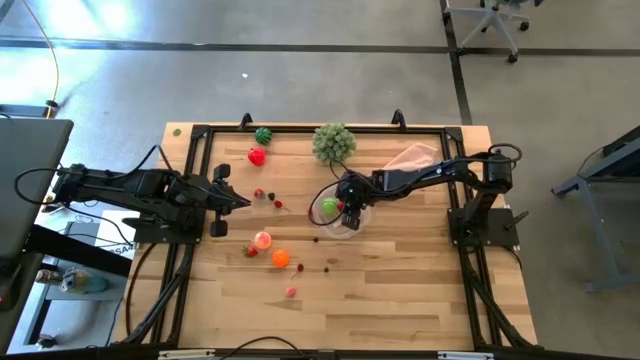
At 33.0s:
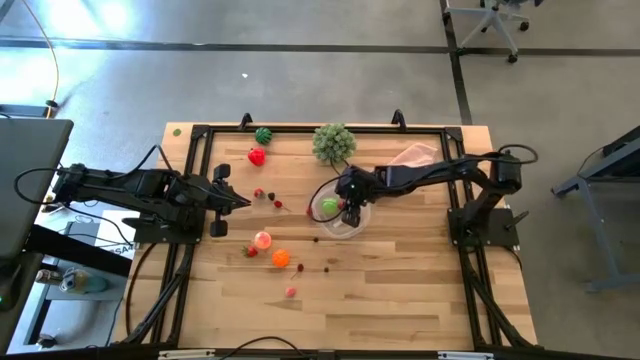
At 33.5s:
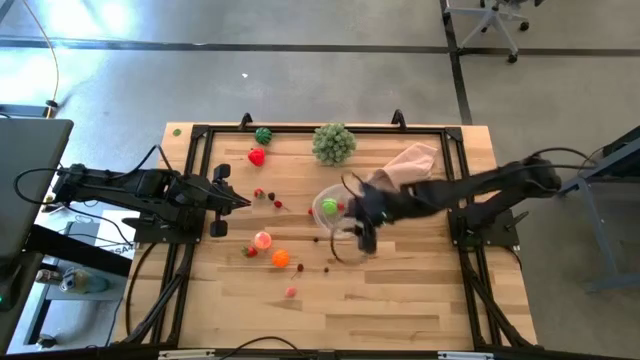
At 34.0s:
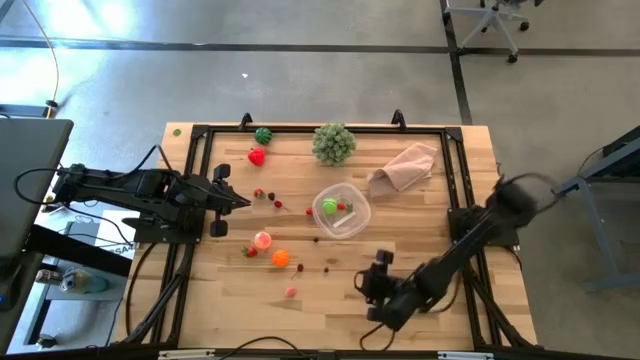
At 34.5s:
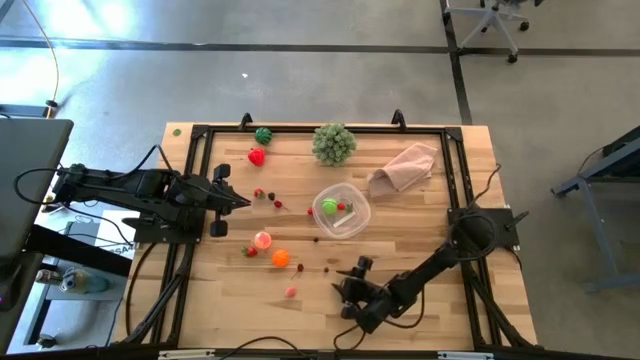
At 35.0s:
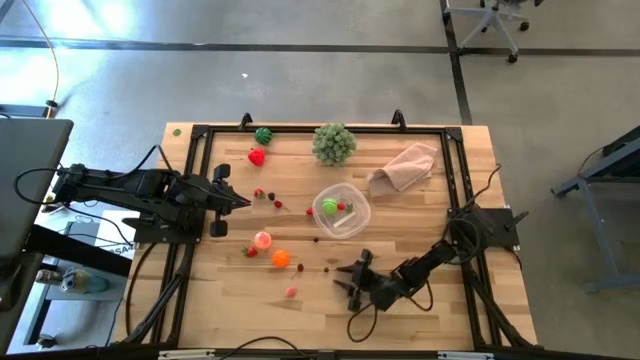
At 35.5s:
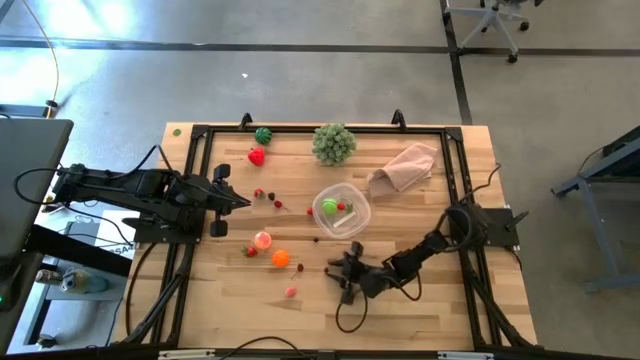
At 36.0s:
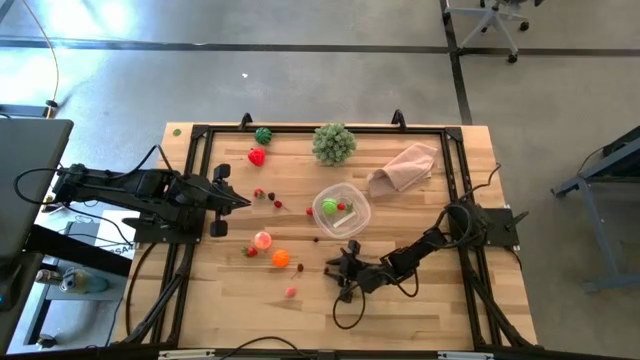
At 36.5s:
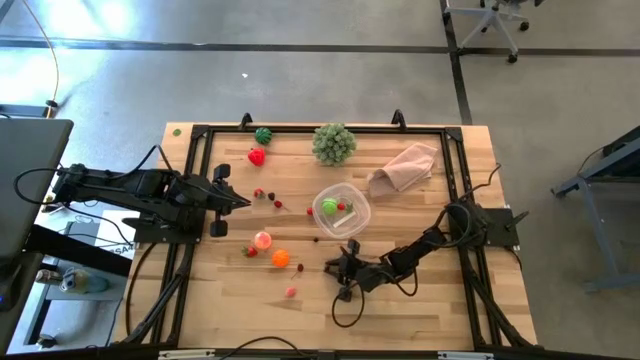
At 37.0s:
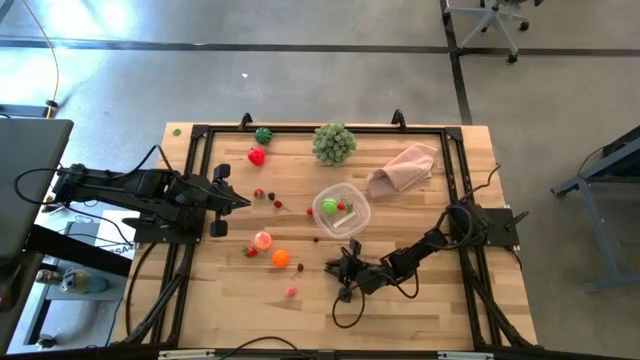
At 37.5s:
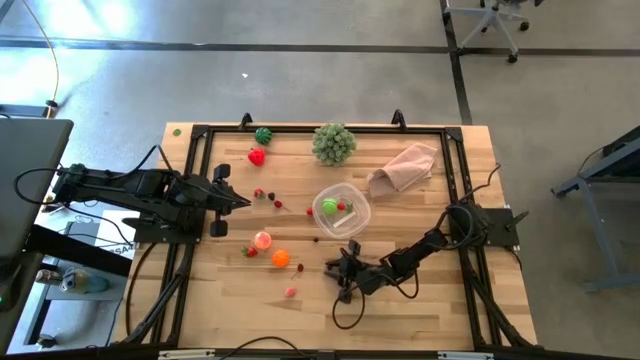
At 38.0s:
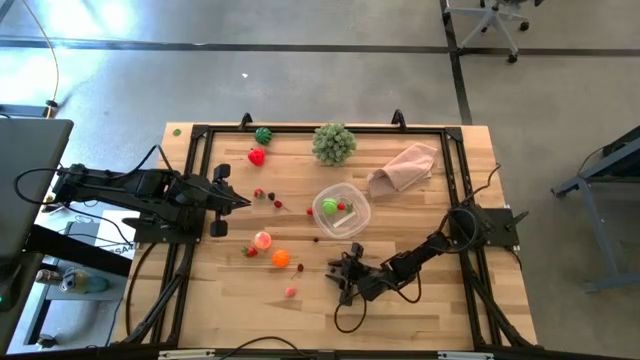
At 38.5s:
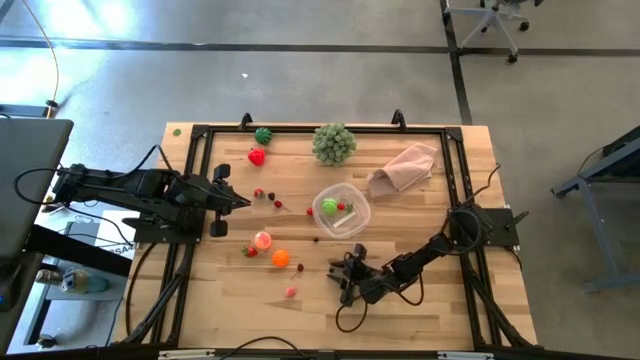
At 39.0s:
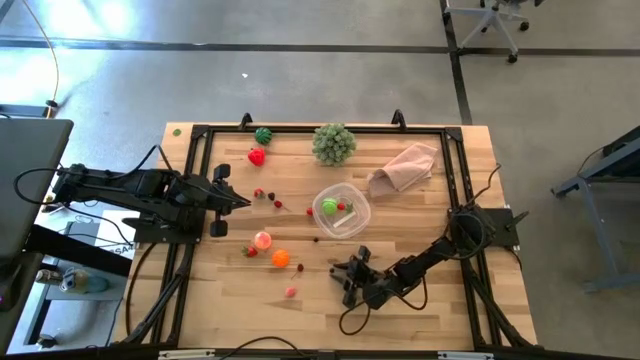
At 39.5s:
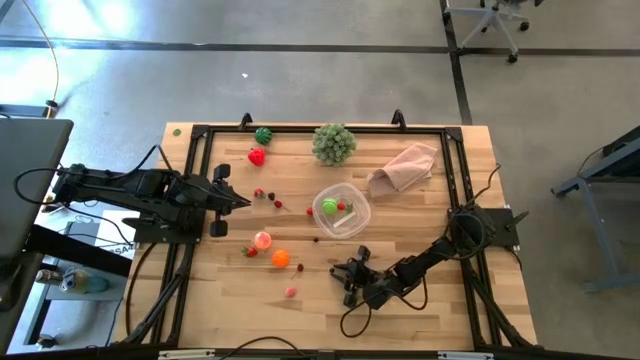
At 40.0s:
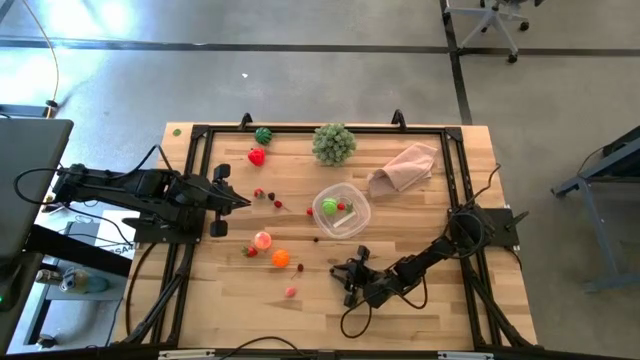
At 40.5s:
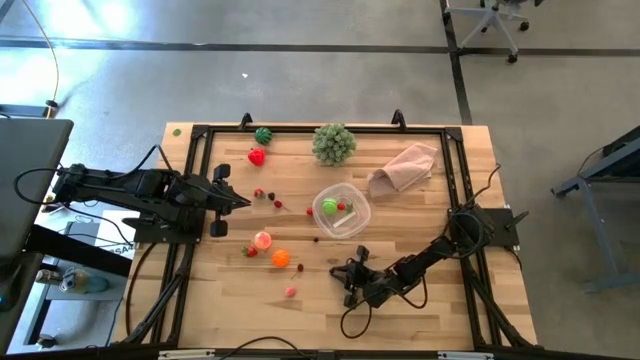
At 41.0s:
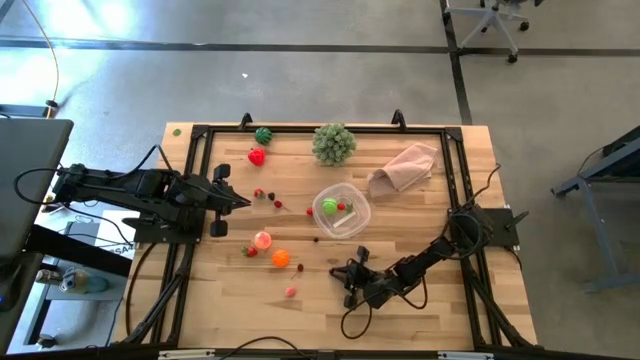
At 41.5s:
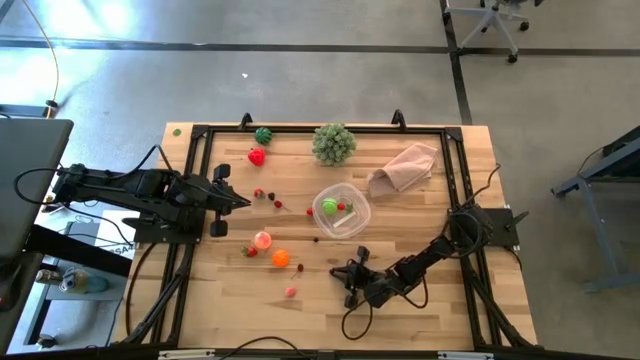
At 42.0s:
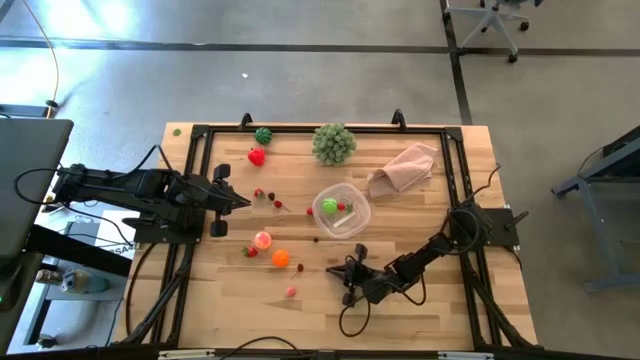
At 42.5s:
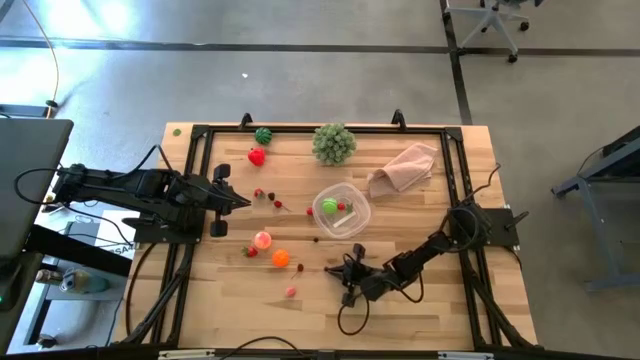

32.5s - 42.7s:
Task: Pick and placing Produce into tupperware
Put the bottom blueberry into the container

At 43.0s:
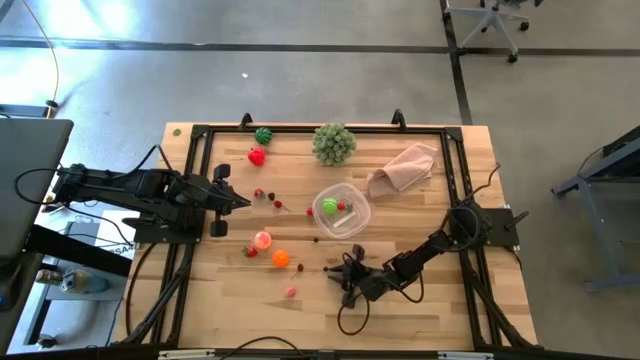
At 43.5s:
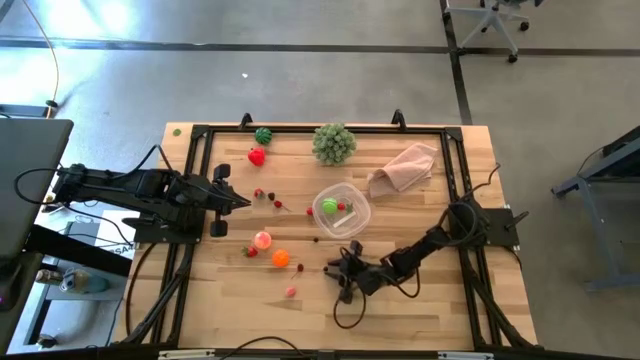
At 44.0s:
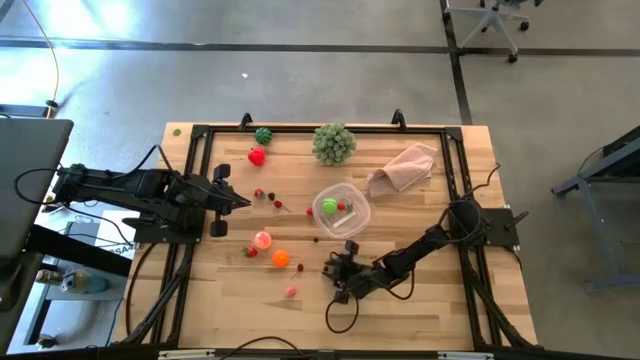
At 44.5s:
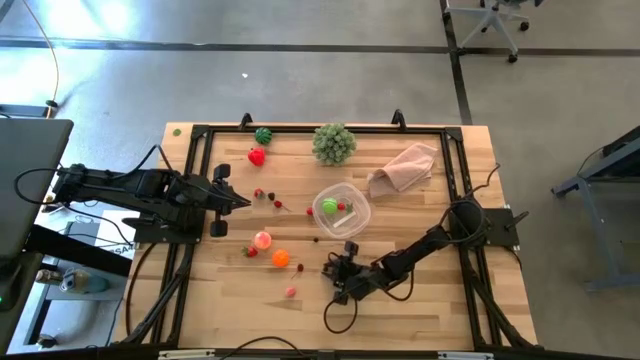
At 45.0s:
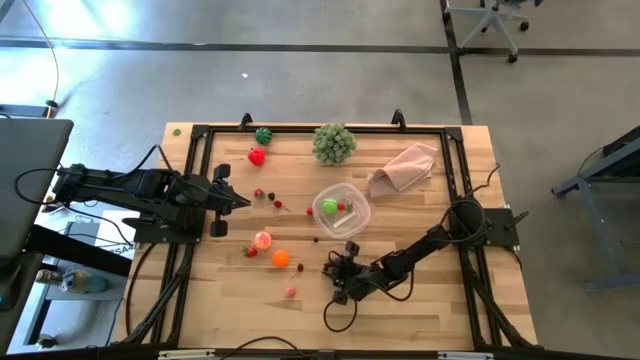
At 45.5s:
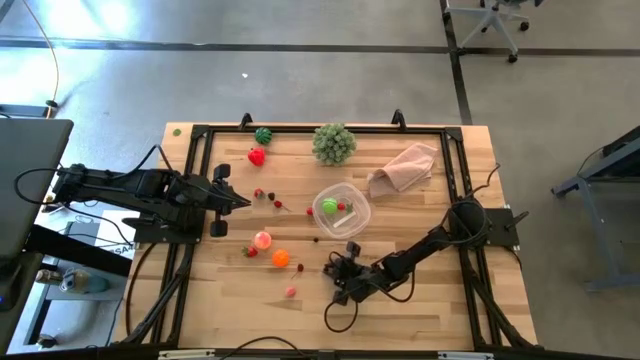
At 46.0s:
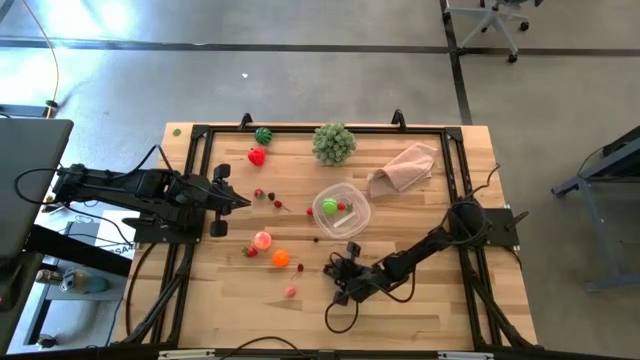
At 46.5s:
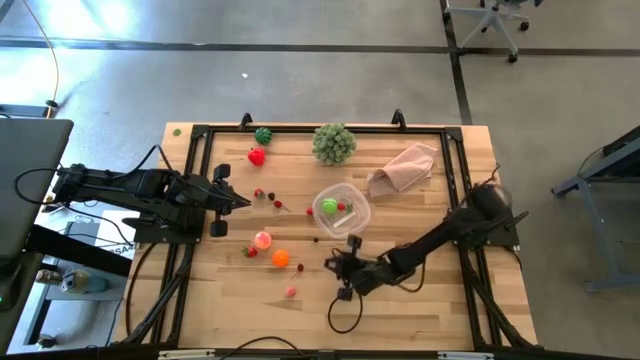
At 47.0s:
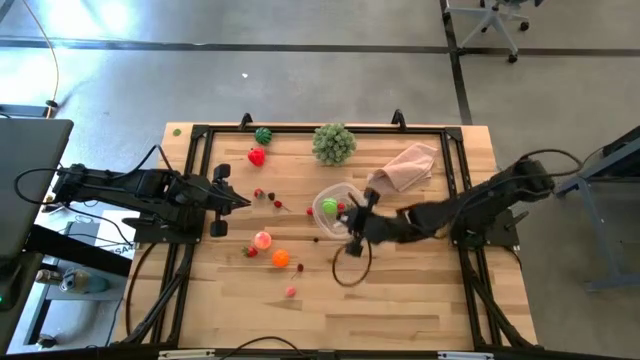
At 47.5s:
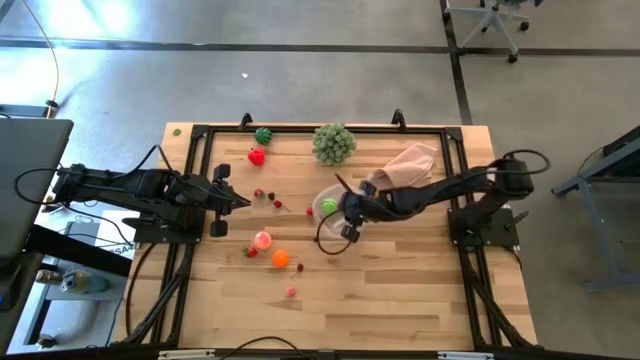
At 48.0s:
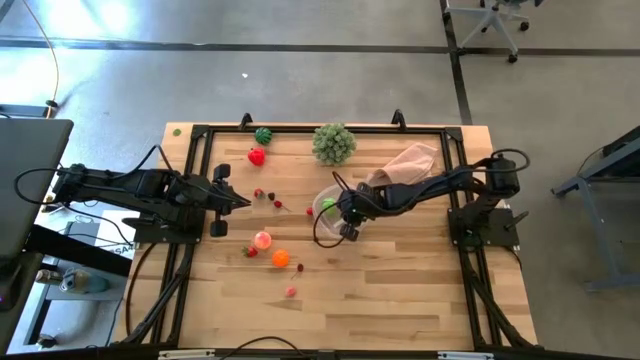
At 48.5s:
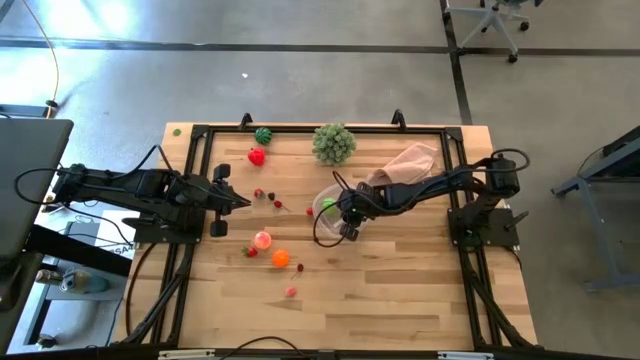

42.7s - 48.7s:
Put the bottom blueberry into the container

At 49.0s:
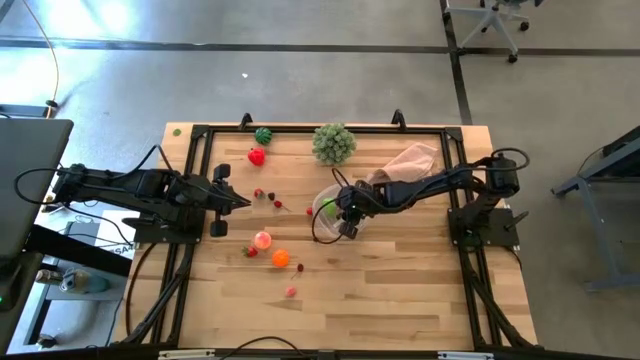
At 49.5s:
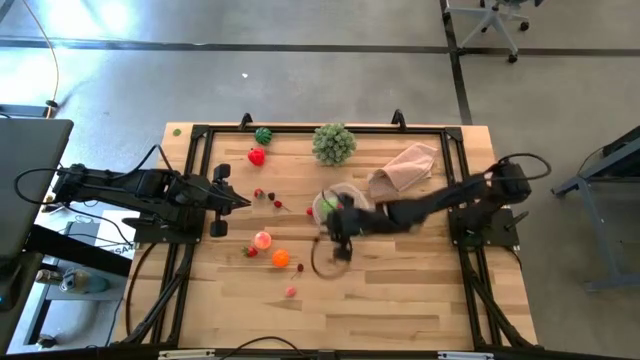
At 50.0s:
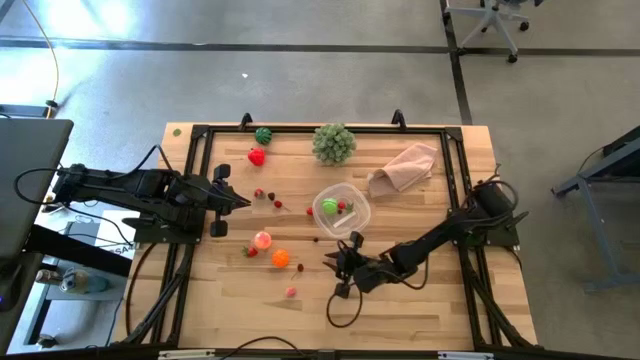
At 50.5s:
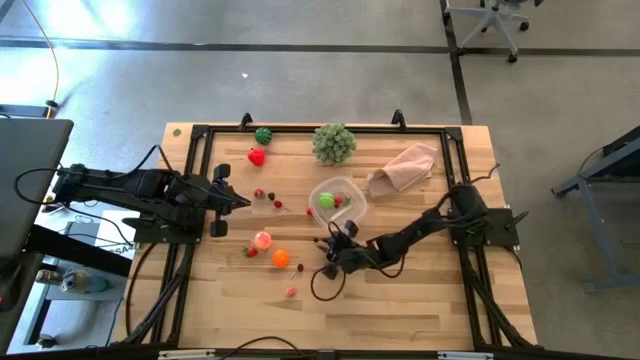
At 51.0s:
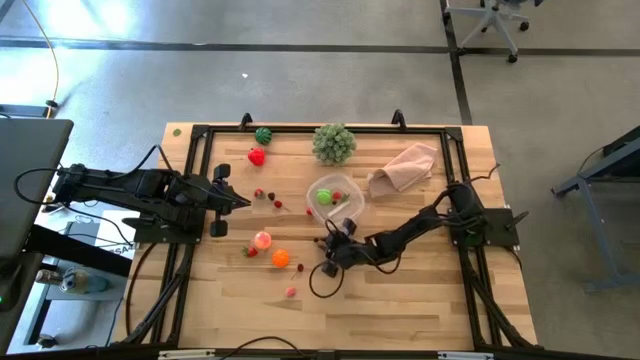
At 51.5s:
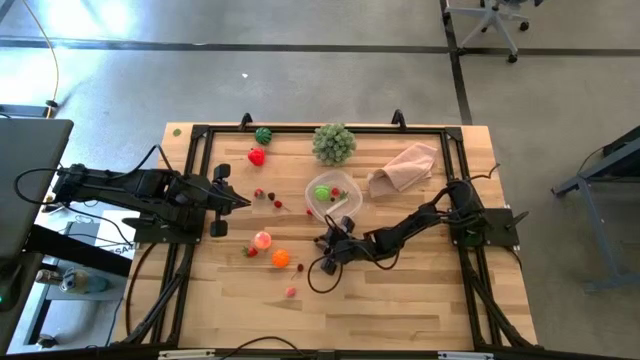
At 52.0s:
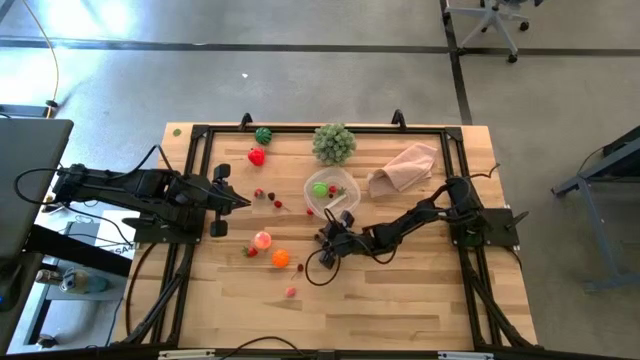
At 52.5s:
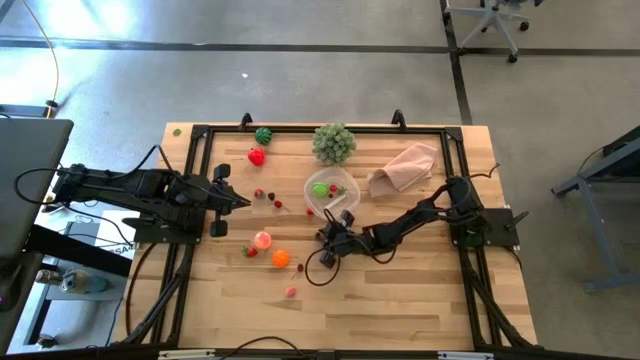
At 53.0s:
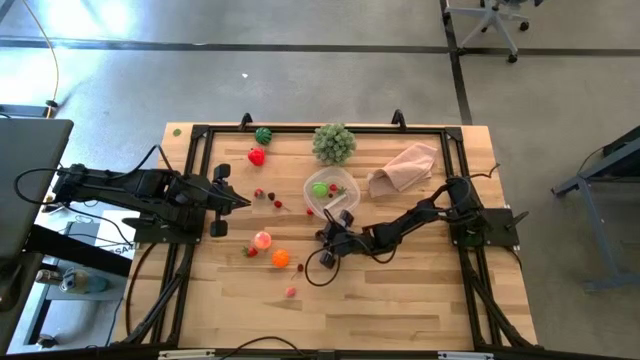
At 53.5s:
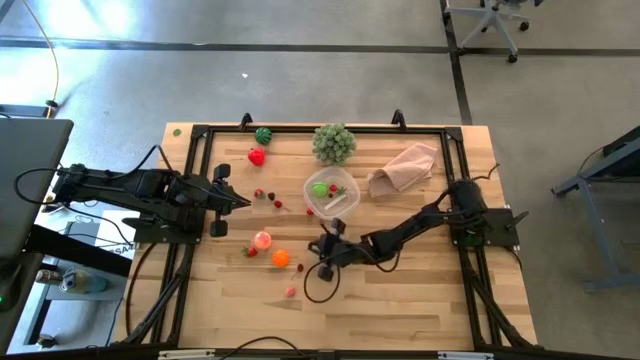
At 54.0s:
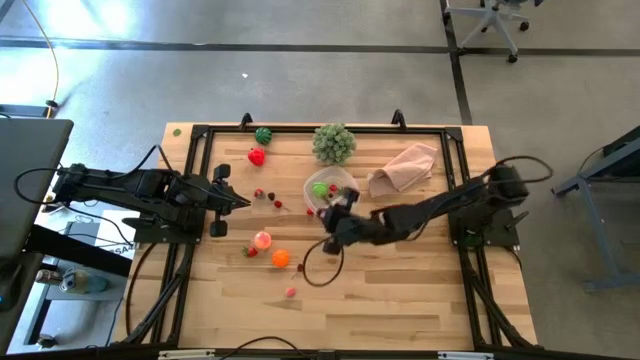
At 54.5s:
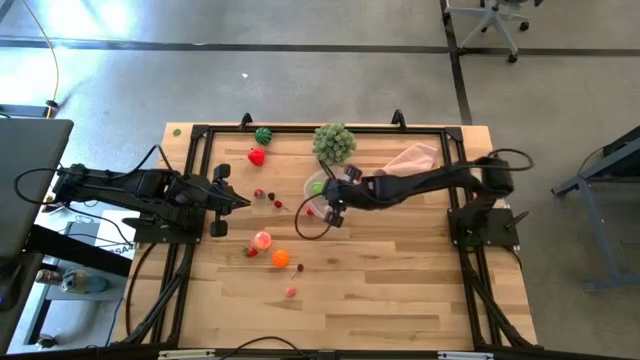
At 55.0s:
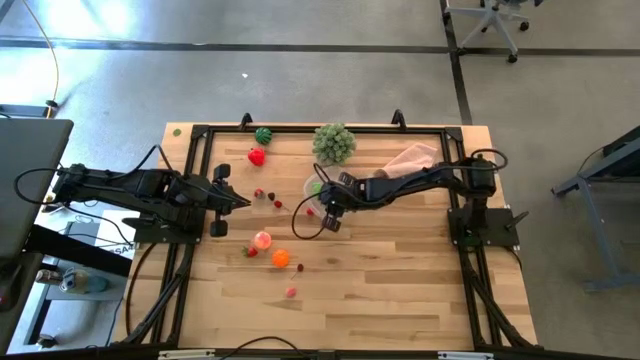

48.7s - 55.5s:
Put the blueberry into the container
